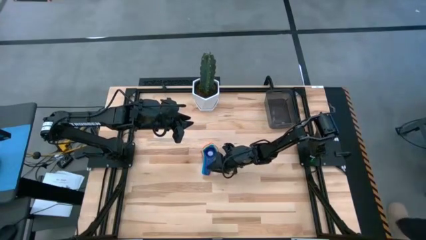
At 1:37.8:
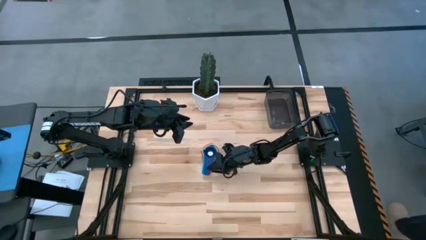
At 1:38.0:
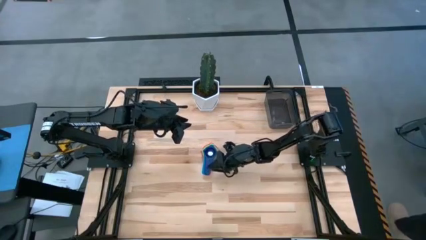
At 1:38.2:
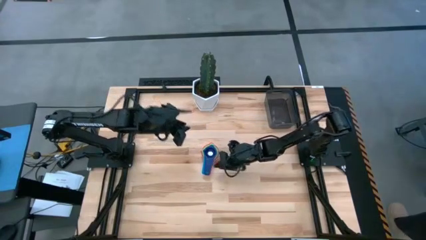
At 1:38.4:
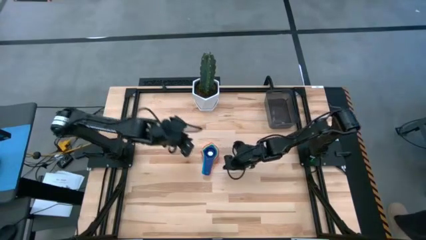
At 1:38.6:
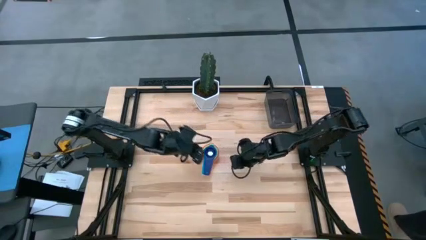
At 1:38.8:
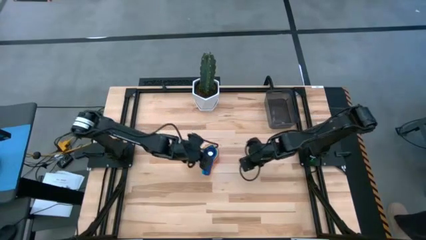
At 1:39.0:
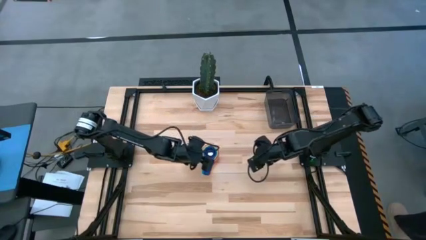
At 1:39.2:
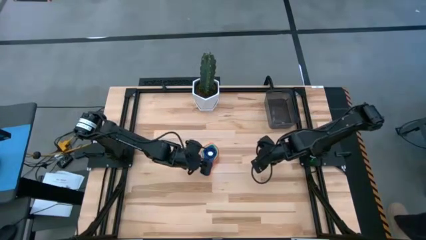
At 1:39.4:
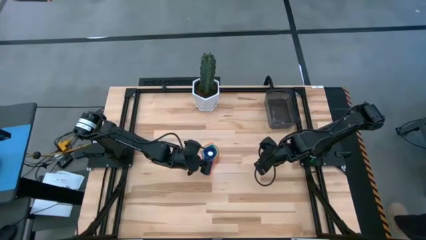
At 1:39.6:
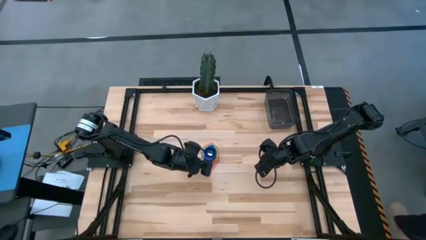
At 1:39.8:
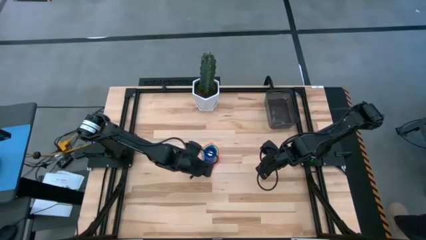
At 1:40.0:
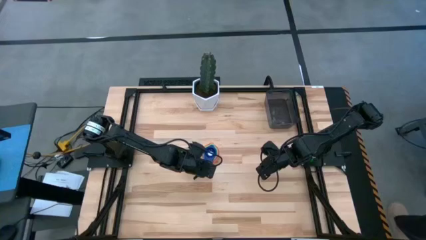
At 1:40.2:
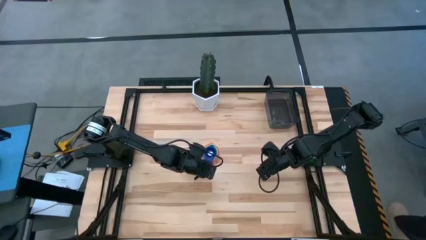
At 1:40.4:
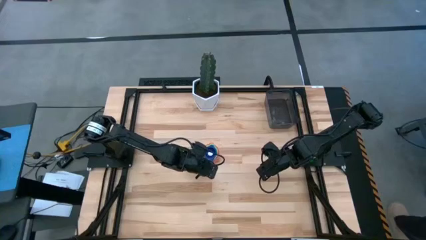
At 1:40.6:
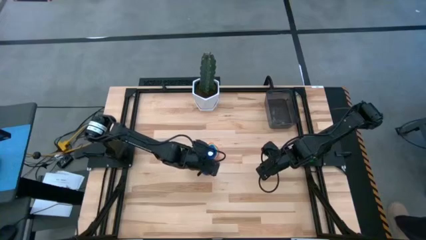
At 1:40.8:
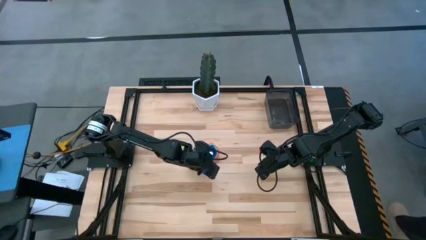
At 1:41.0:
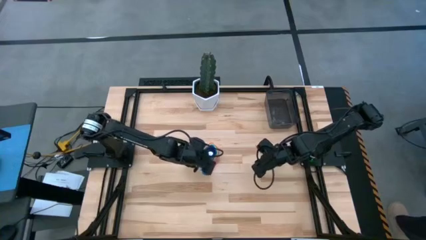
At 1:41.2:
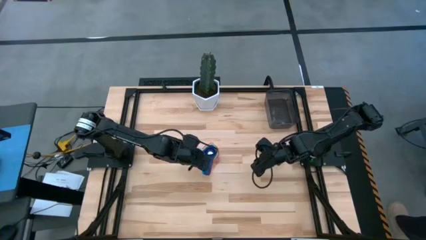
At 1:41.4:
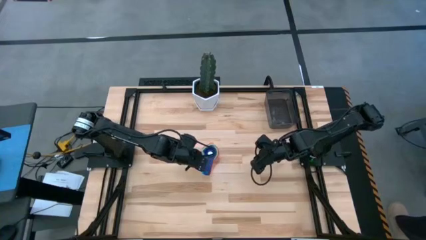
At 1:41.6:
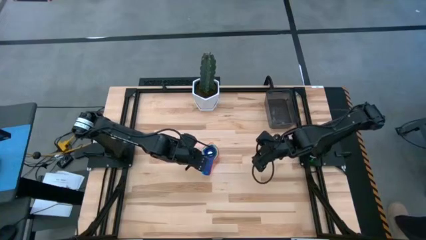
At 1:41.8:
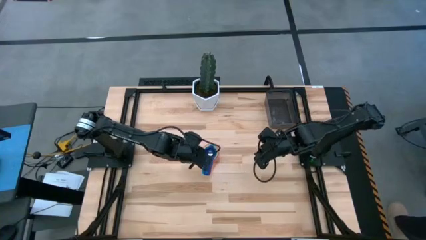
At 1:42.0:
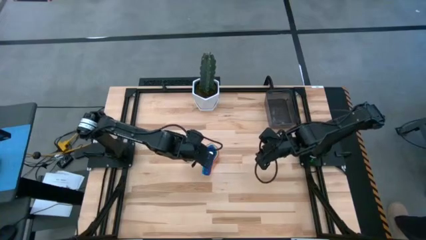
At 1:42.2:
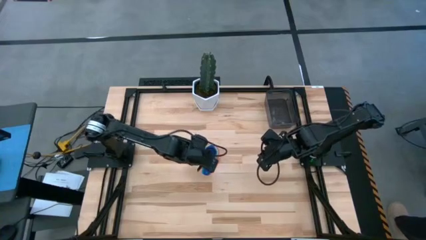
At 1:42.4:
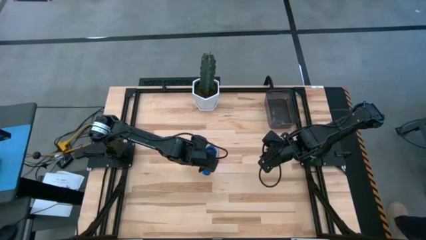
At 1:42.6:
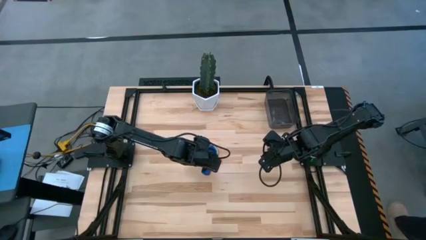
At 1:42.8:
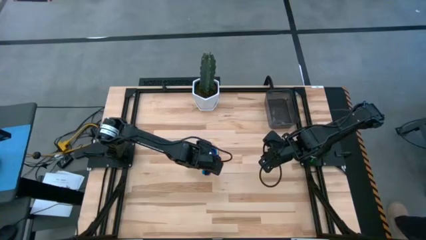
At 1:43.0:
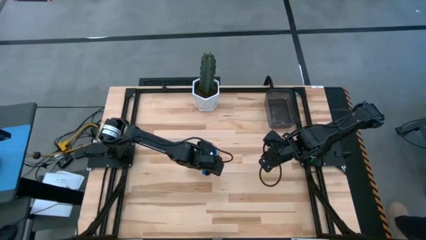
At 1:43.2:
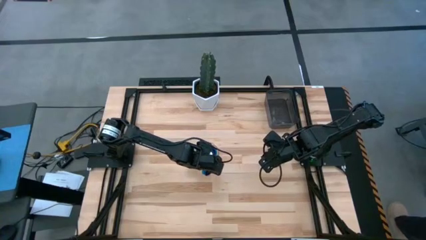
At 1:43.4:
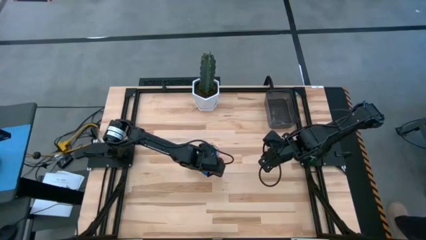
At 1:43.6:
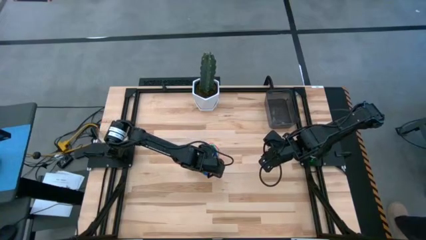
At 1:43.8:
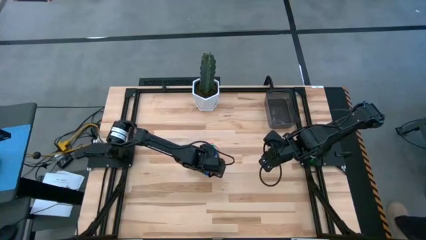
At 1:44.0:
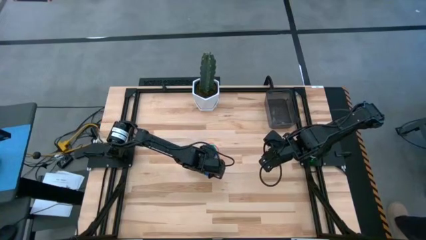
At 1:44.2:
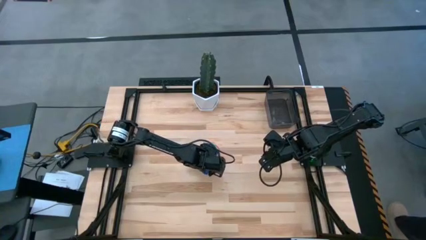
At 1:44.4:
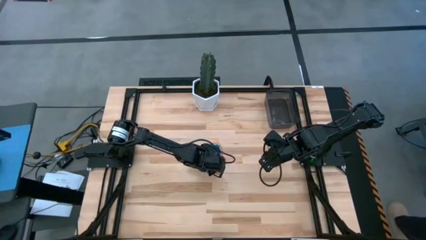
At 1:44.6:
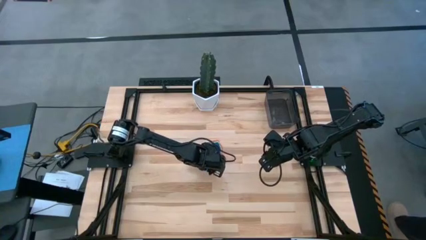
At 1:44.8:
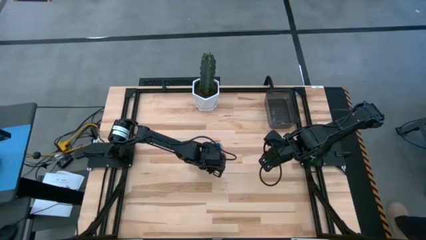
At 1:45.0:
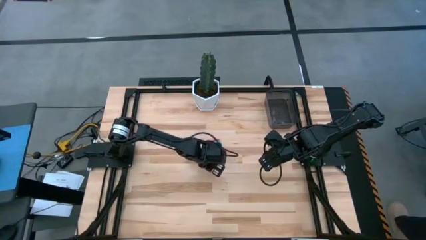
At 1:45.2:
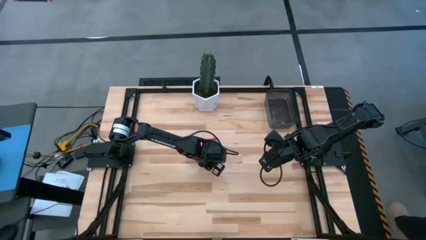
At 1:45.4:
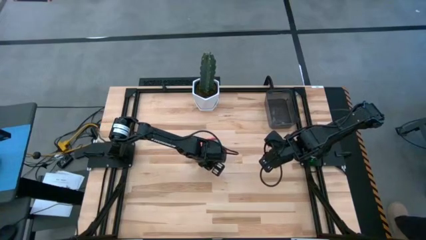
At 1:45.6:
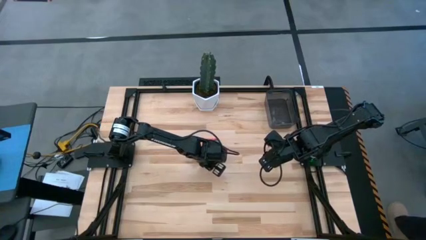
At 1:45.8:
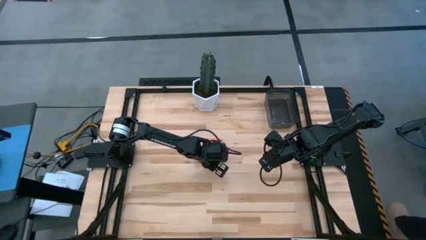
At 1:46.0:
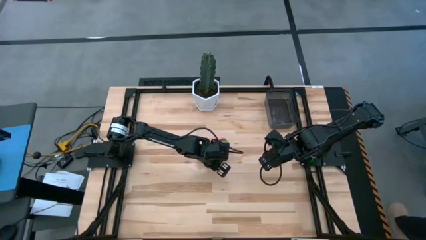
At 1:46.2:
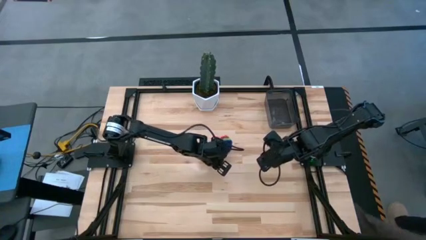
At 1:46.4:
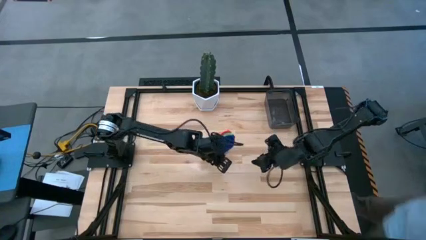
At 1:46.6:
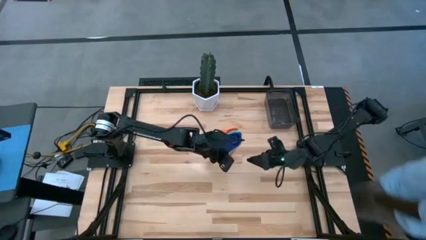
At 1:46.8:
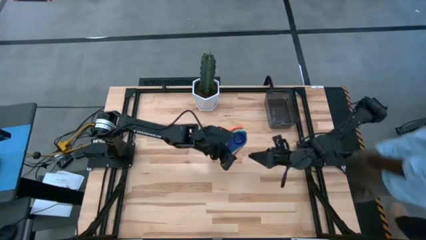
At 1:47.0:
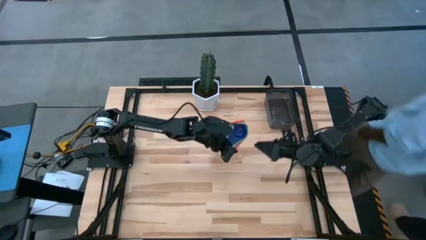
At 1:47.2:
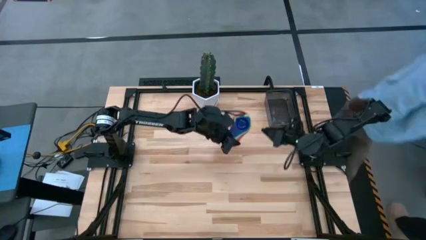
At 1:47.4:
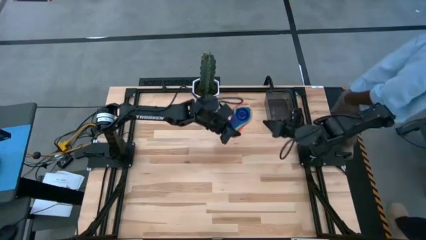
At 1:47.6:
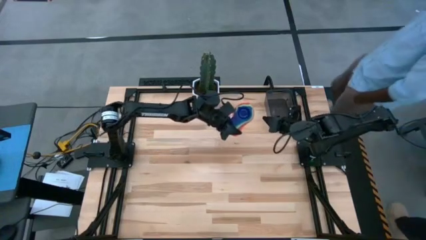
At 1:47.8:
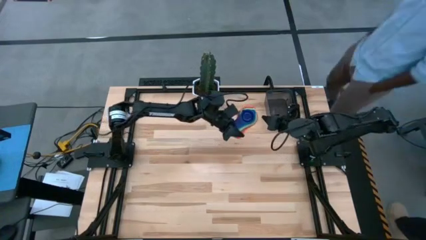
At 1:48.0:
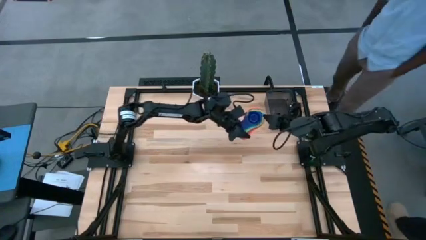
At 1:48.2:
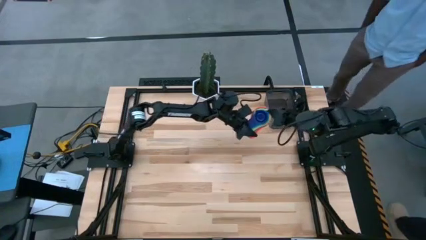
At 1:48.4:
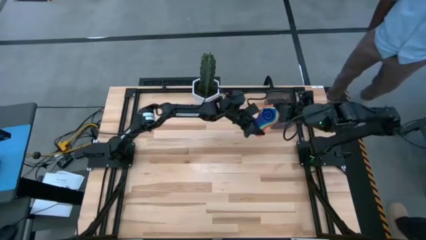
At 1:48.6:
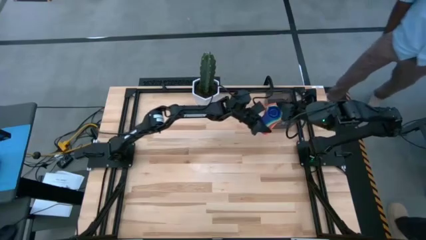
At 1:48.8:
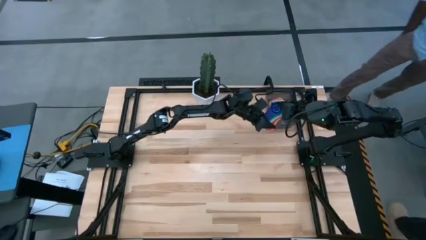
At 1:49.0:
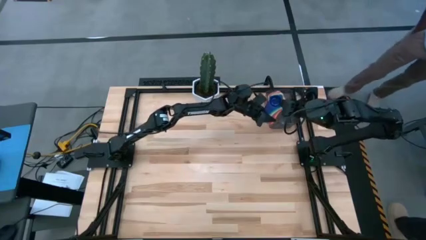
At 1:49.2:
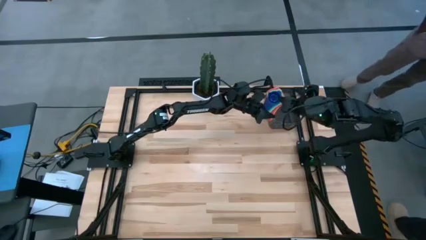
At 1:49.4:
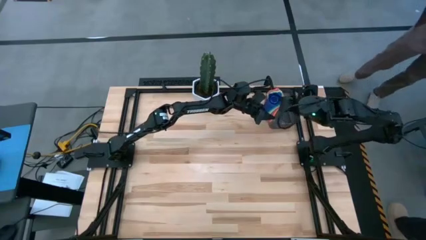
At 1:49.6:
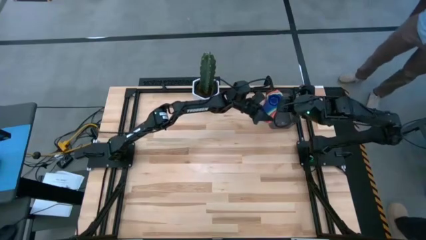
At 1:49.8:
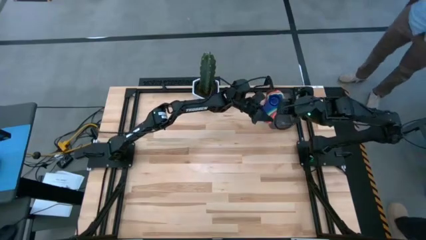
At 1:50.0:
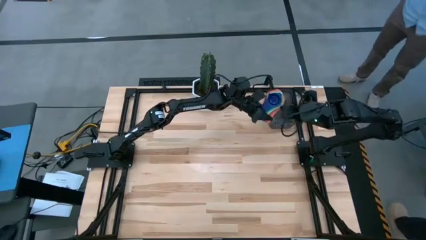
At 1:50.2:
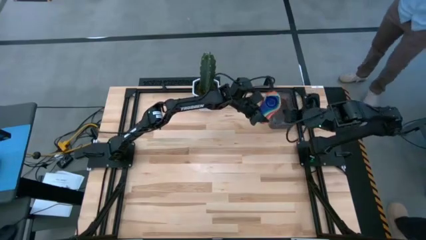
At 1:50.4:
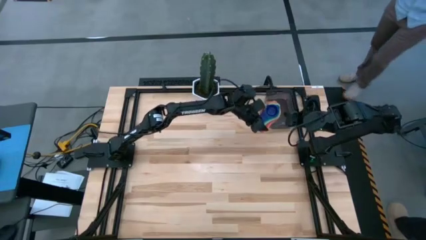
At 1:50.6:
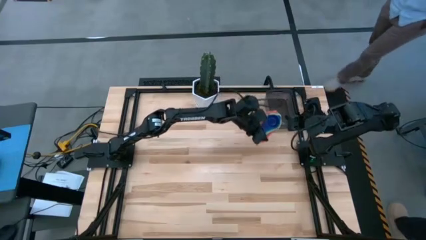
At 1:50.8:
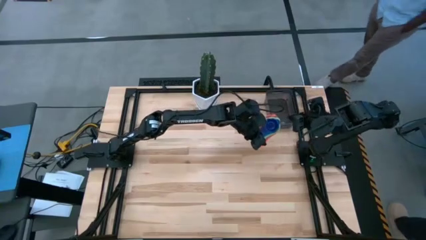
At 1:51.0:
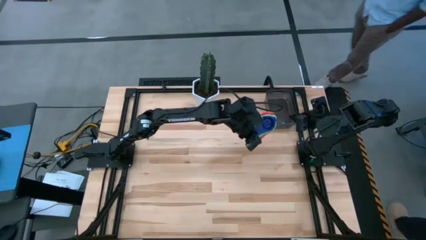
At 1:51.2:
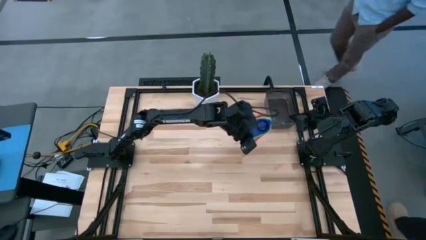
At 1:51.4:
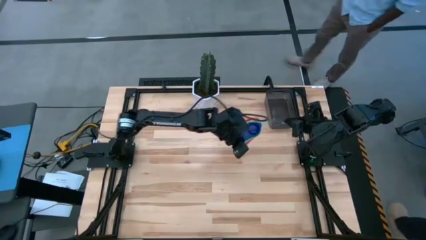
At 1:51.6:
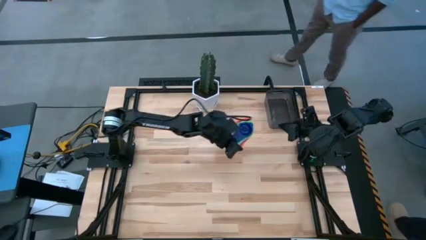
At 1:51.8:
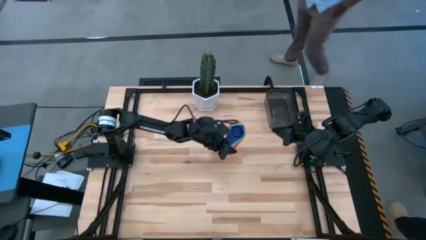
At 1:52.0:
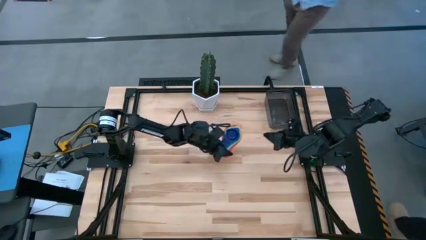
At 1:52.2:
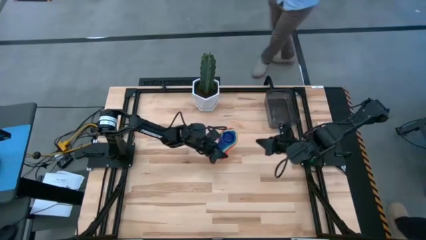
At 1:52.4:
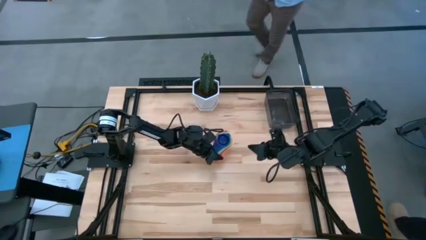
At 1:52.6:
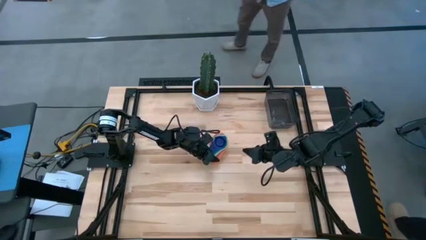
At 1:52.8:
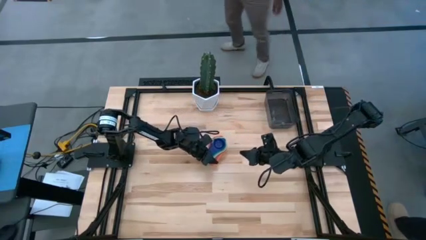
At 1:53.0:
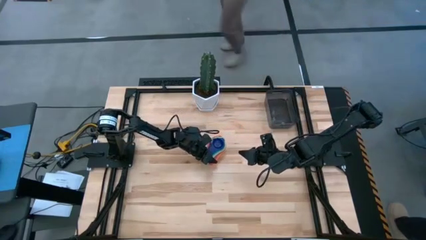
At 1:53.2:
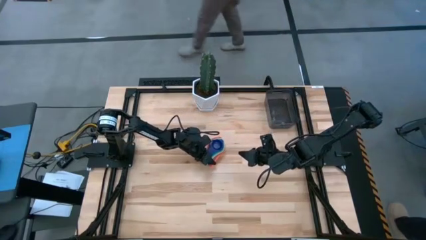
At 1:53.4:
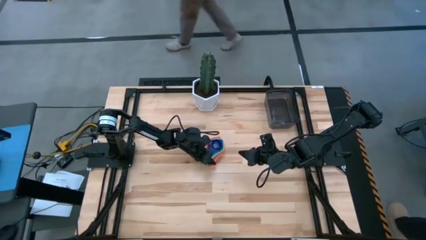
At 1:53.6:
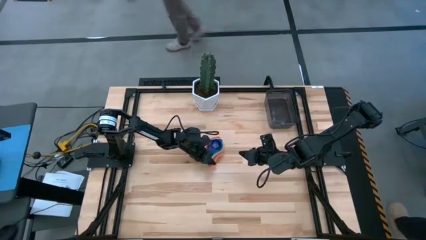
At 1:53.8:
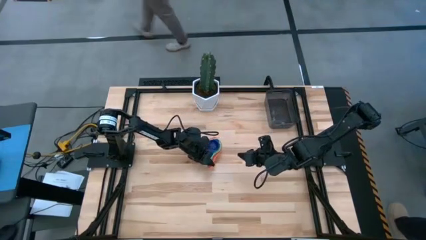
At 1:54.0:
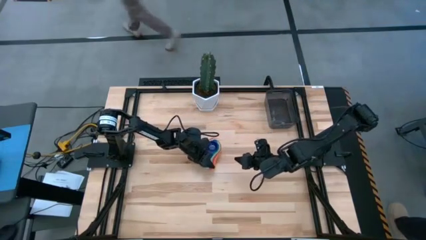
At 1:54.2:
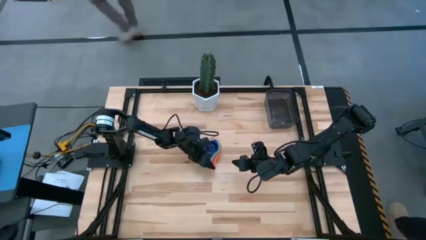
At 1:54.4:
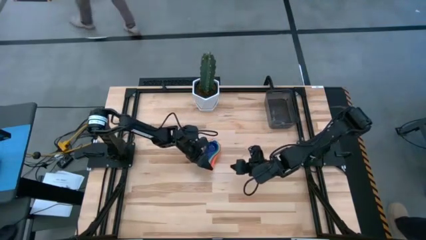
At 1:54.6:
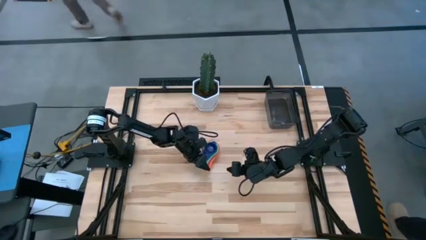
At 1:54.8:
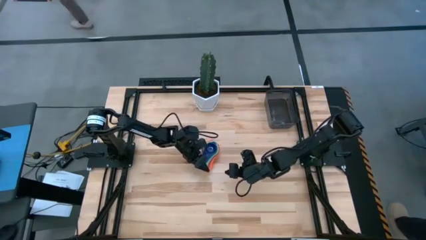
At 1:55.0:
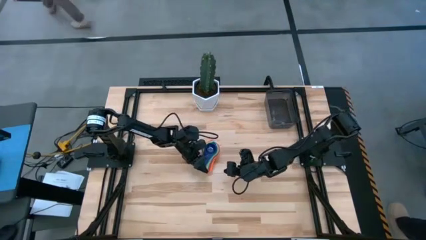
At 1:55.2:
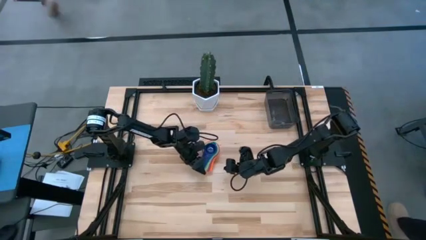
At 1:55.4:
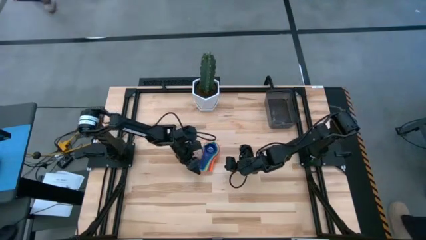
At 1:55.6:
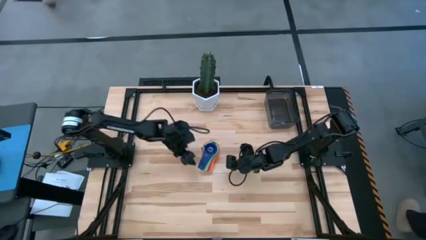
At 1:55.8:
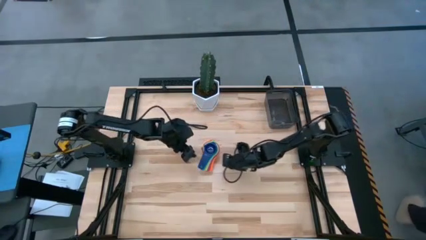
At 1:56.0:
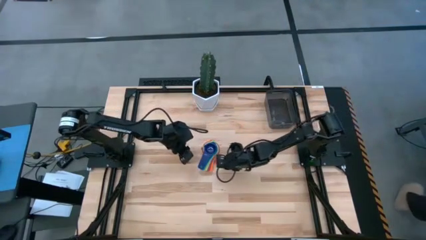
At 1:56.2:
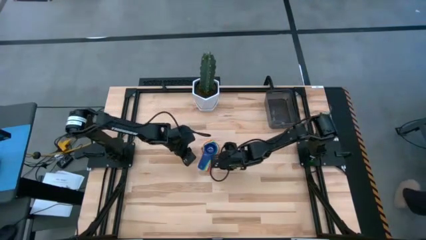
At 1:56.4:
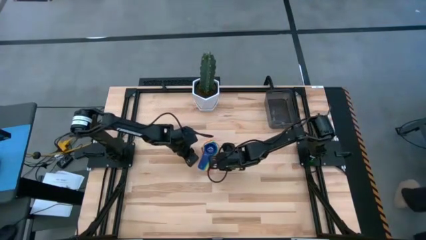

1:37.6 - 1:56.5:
Task: Nest measuring cups in basket
Put the stacked measuring cups into the black bin
